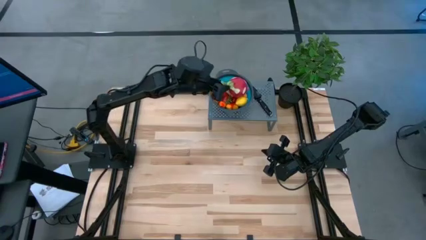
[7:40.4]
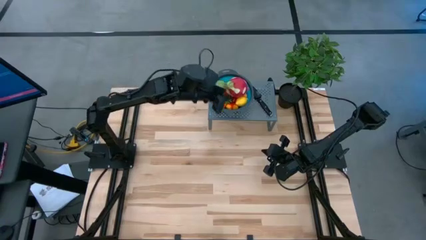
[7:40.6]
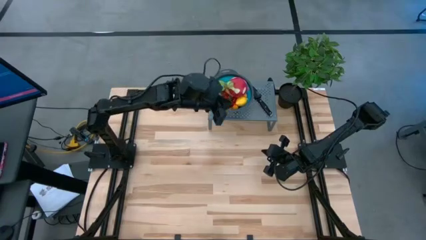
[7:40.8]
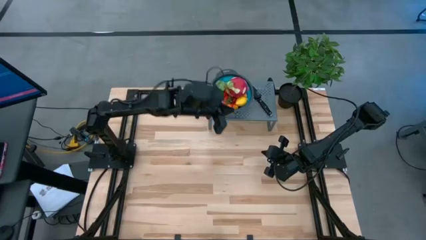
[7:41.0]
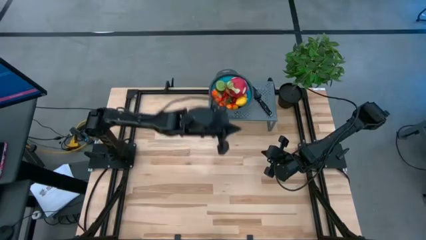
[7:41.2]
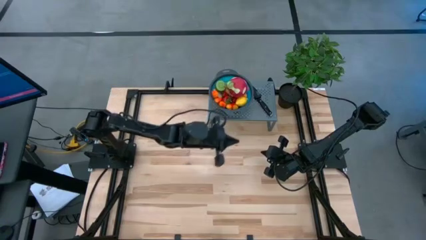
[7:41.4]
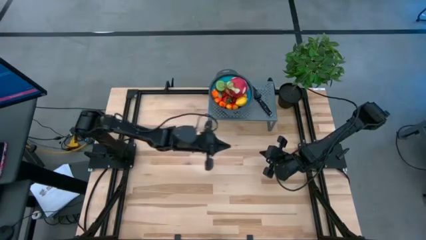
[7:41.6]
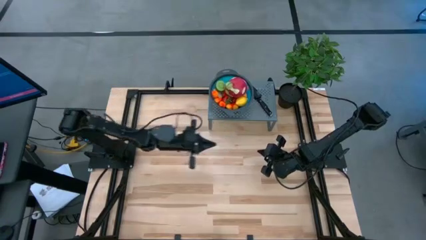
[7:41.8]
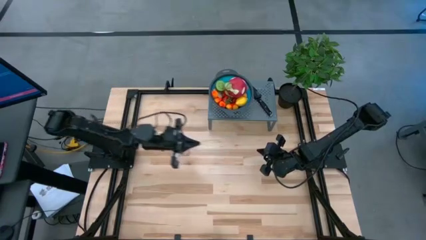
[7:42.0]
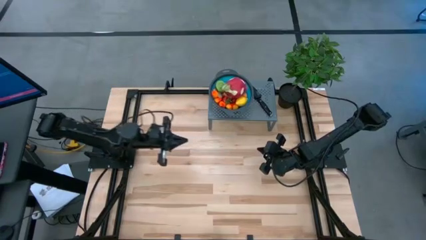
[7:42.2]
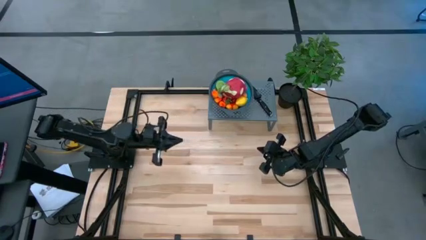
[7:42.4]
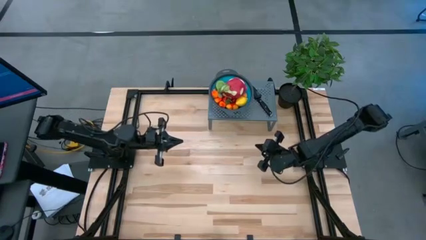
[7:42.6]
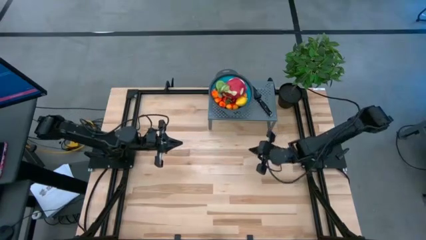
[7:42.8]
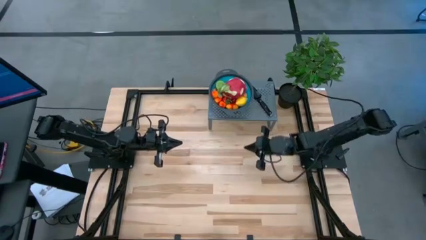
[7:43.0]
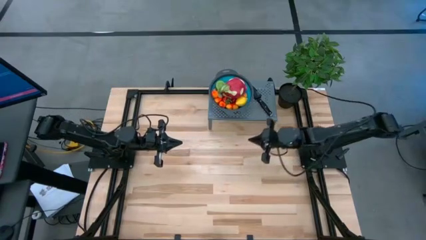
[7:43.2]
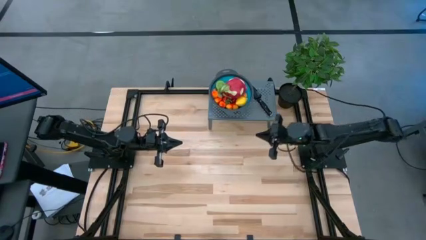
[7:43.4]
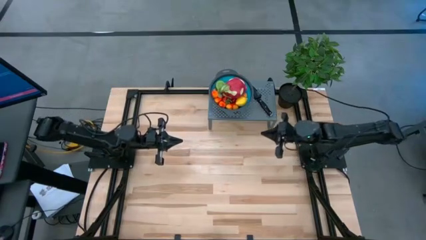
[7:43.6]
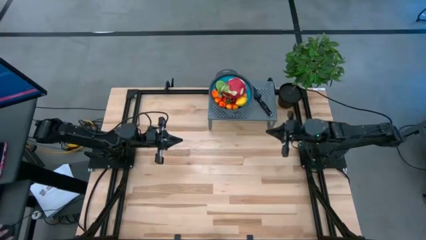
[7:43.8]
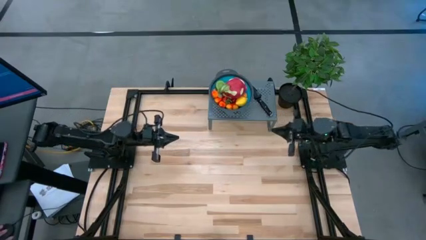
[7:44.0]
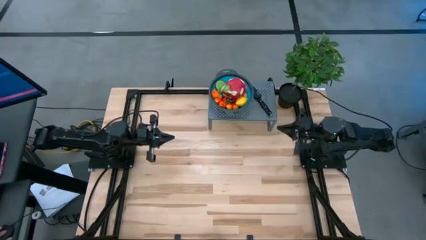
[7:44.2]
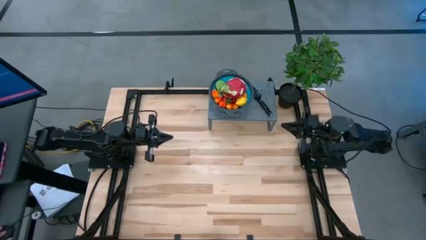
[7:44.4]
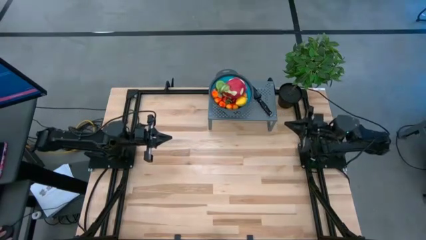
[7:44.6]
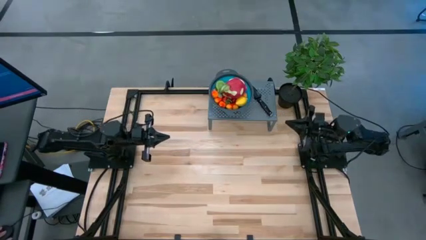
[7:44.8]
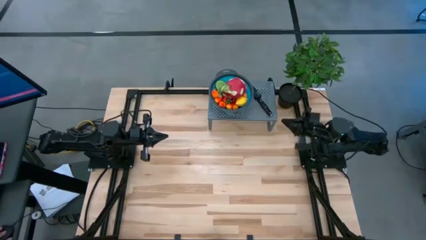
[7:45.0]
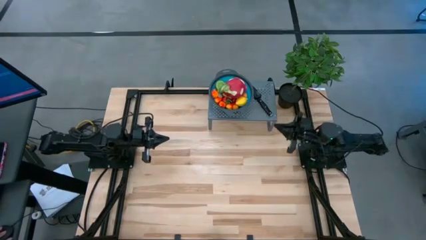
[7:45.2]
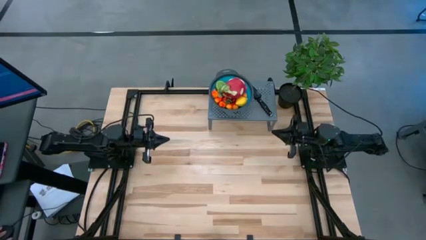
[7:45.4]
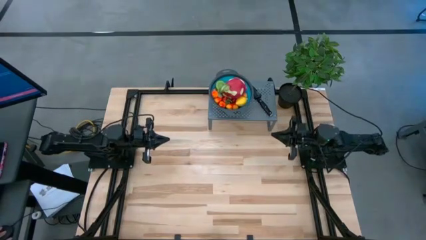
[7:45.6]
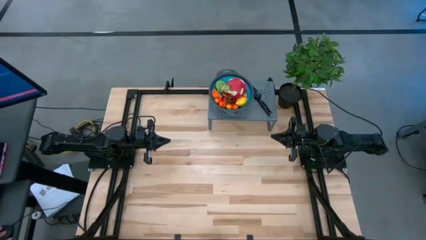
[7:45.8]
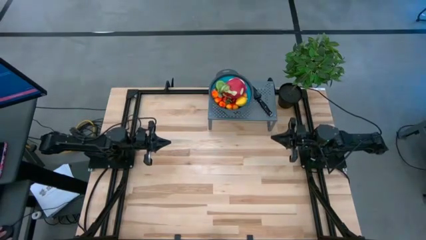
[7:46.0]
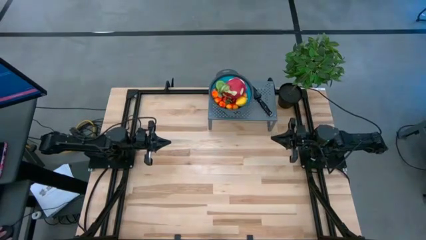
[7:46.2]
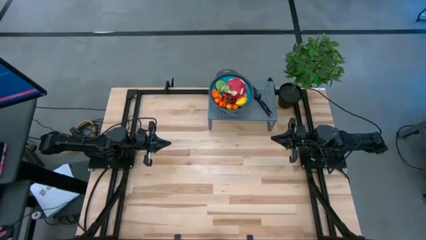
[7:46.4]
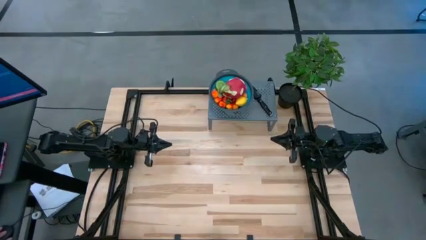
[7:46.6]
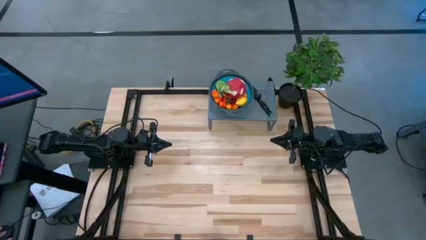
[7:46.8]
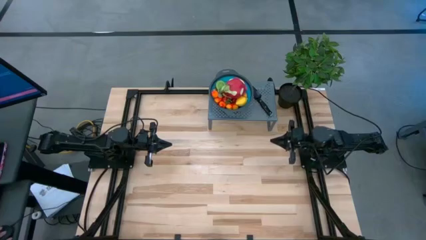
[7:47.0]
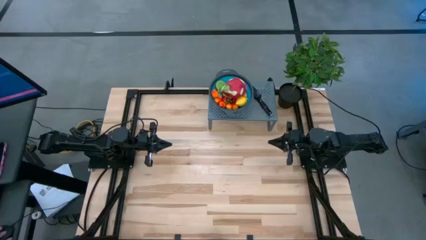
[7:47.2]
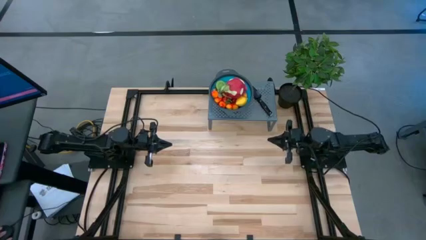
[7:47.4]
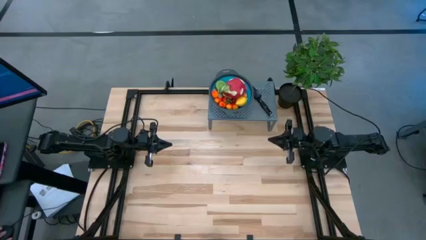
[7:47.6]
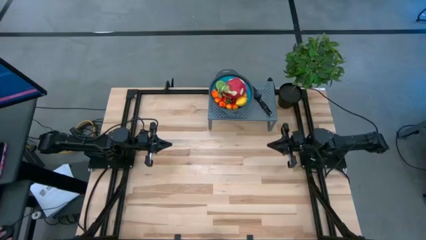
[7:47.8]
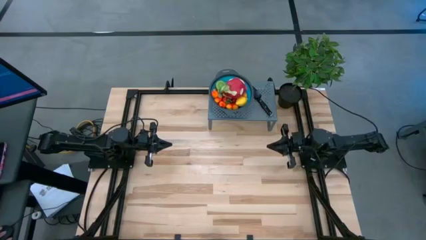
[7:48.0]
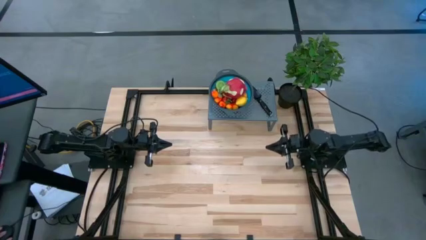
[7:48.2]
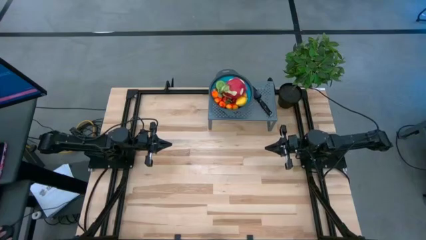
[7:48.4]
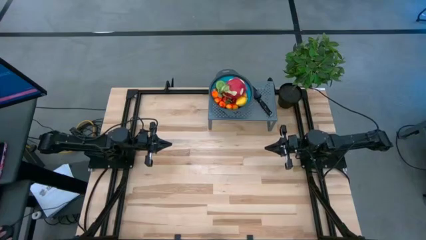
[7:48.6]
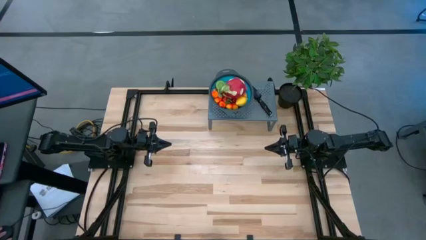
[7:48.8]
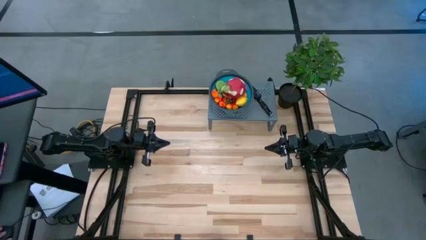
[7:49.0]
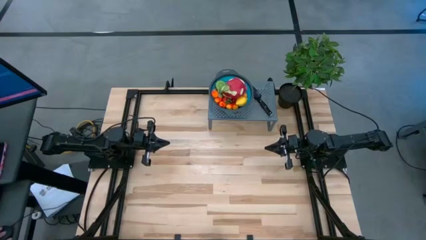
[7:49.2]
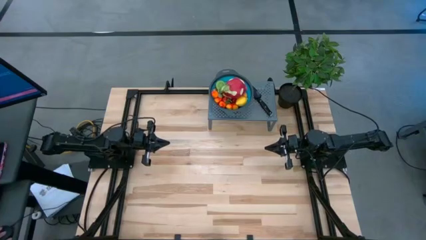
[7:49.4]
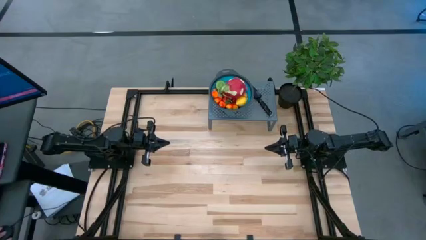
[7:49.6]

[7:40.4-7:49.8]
Task: Pick & Place Fruit
Return to Home Position

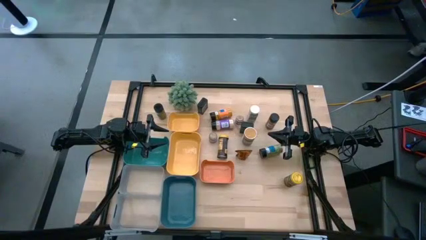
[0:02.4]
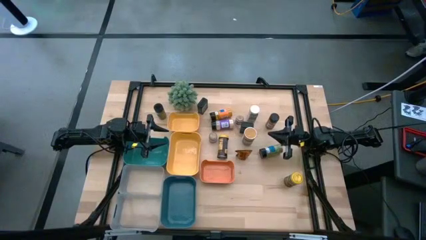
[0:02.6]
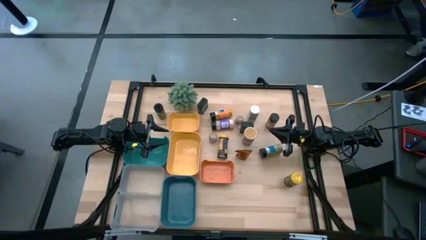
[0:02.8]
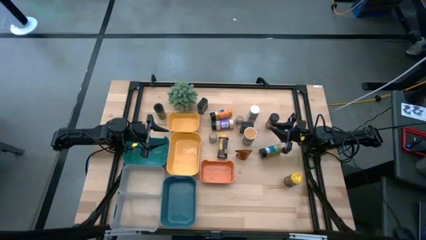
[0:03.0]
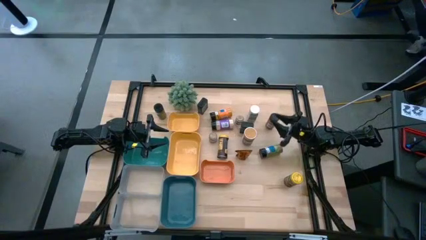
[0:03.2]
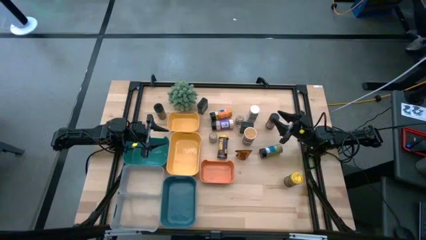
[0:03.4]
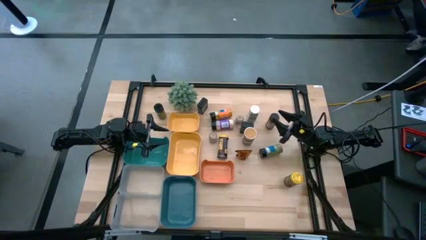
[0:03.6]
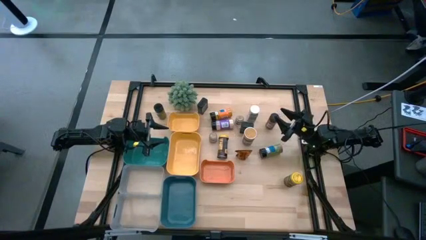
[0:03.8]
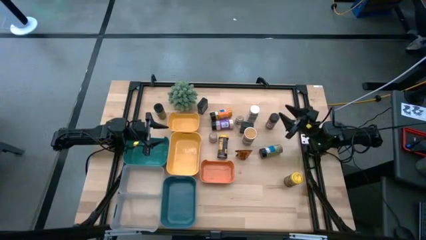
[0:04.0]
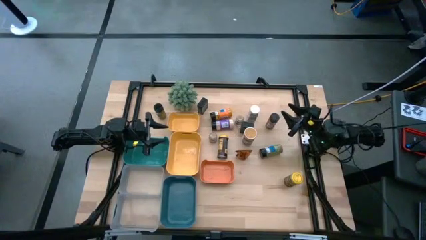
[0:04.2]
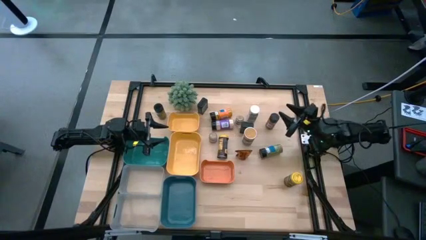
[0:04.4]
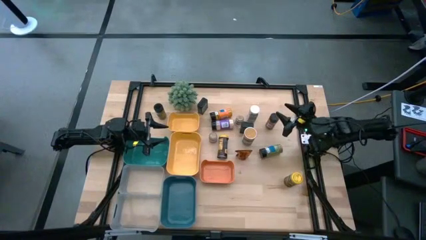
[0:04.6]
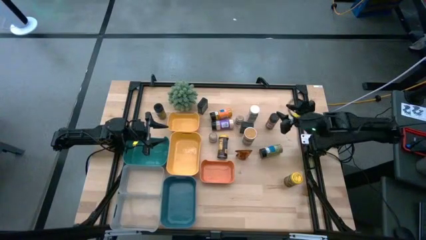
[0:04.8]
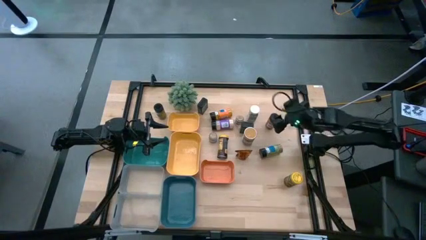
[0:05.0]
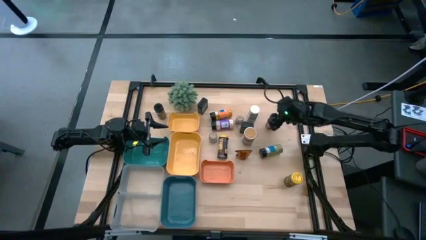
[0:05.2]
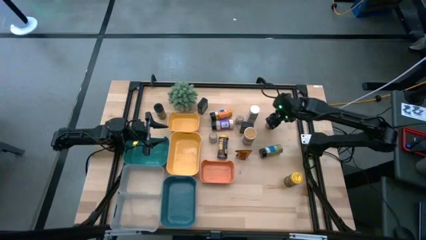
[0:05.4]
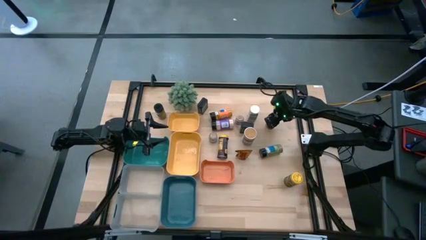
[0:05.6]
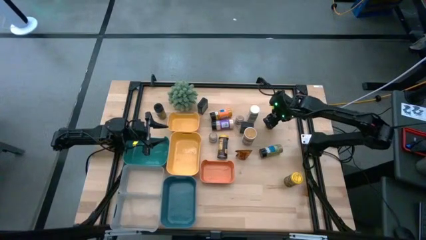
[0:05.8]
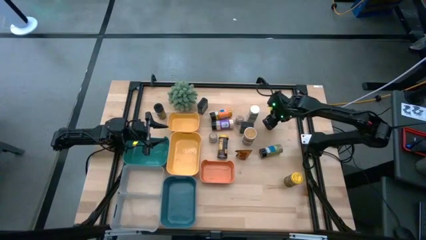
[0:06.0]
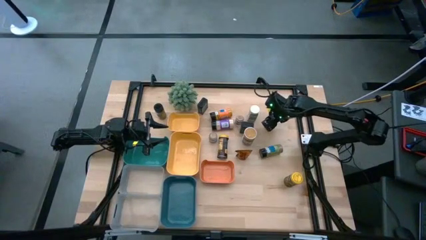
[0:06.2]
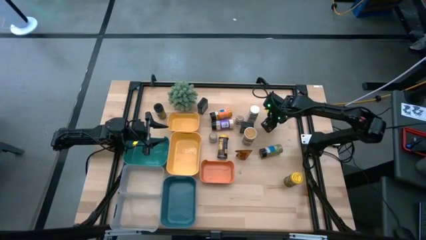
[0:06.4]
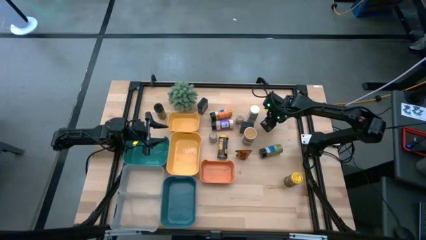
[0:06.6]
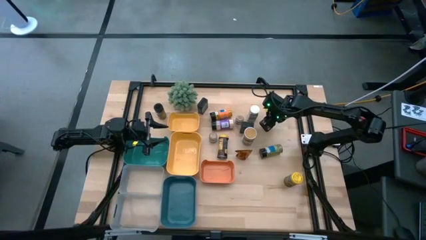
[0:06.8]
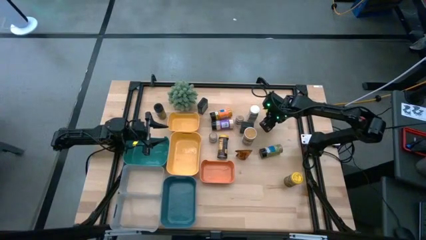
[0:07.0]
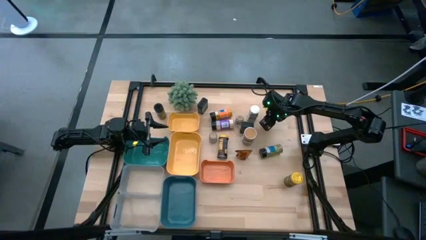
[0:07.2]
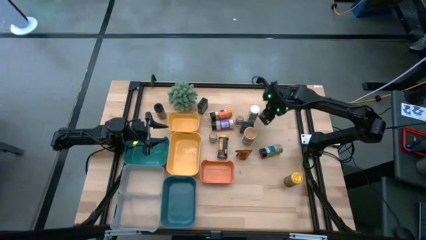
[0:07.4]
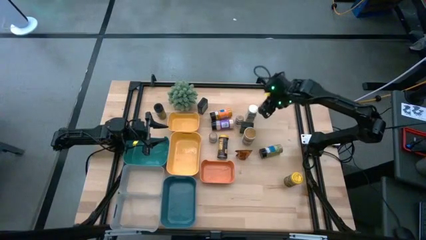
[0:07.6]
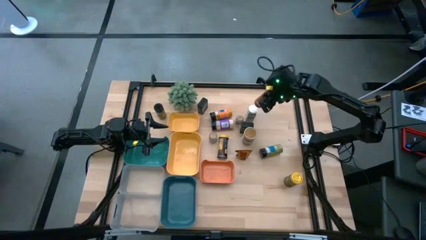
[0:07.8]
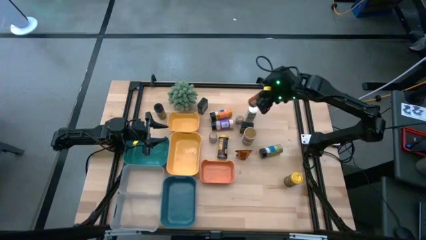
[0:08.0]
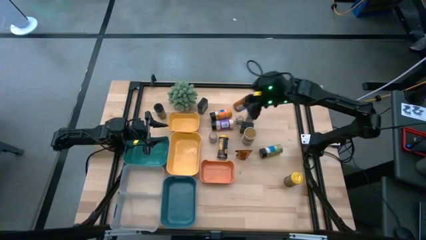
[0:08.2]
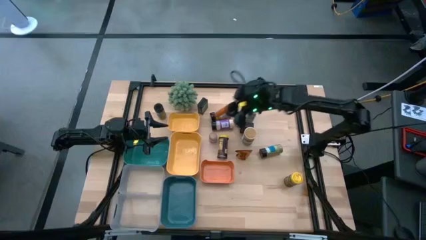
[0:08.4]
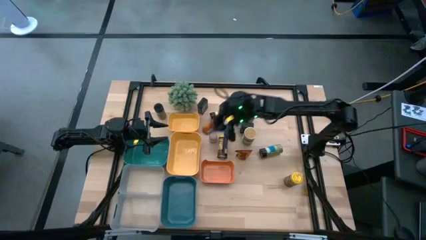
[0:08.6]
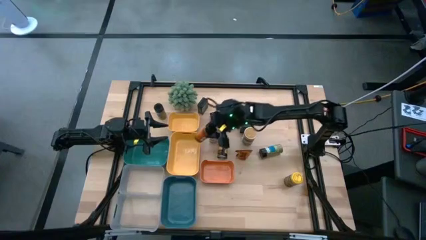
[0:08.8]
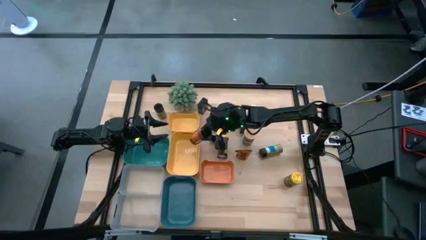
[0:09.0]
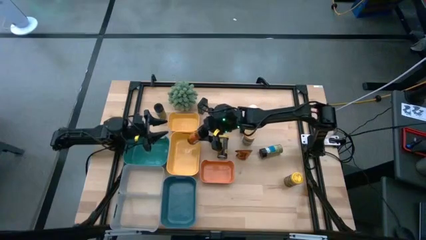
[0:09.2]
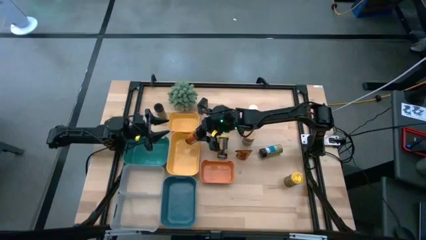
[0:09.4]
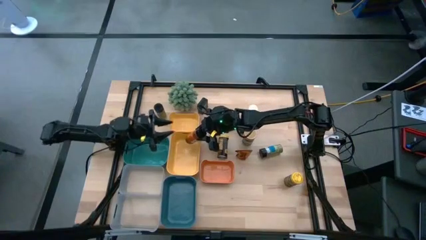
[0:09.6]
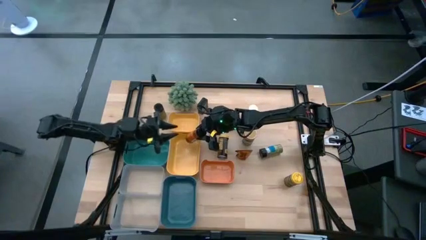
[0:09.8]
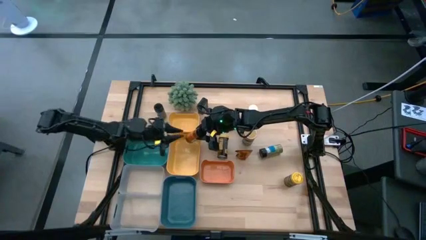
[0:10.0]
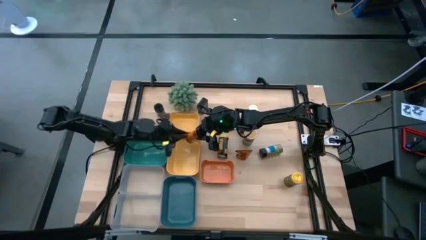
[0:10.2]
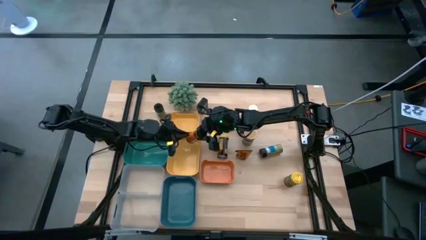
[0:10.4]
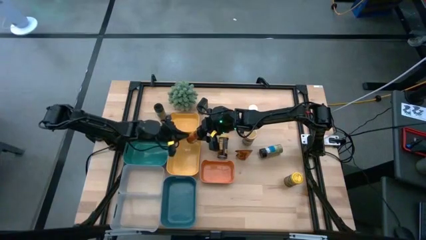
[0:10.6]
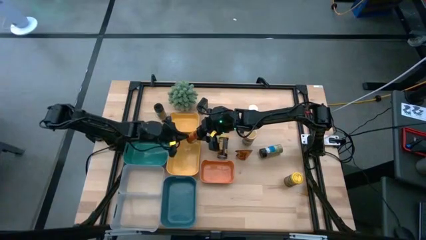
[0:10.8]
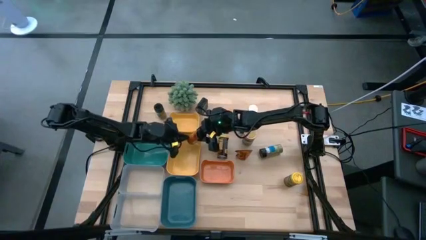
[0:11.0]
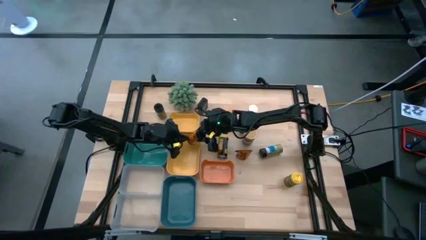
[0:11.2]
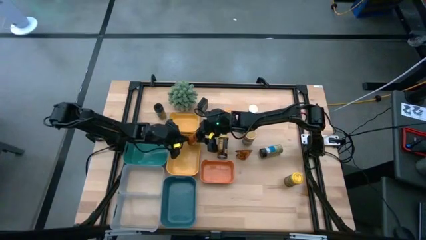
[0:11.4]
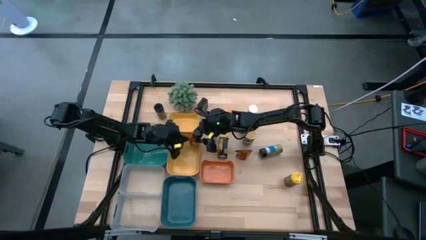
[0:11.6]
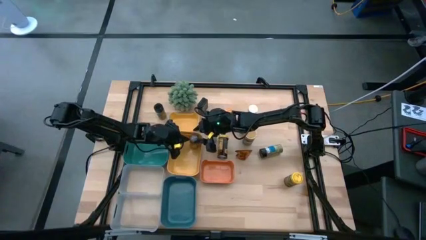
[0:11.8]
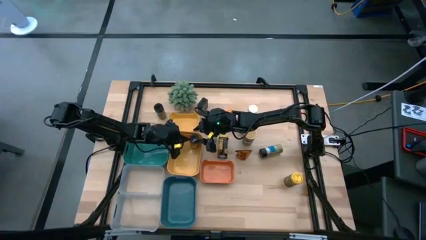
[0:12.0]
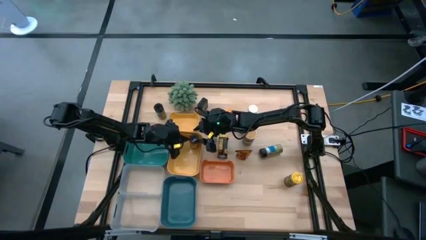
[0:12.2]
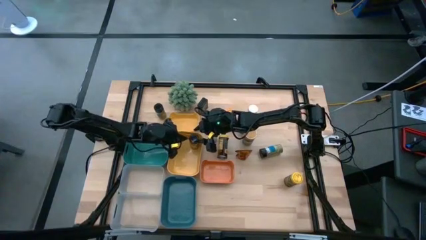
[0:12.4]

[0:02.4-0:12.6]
Task: Sort spices by type
Put the black seasoning bottle into the bottom yellow bin
